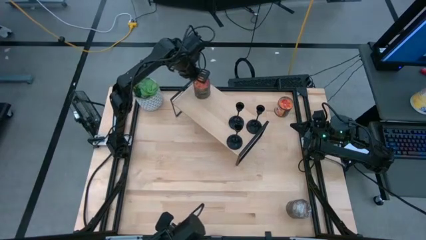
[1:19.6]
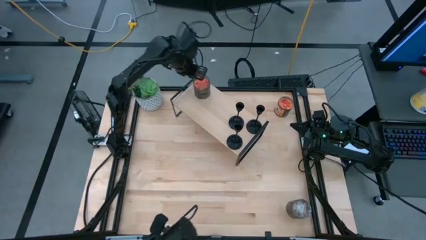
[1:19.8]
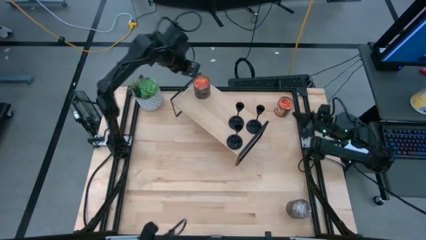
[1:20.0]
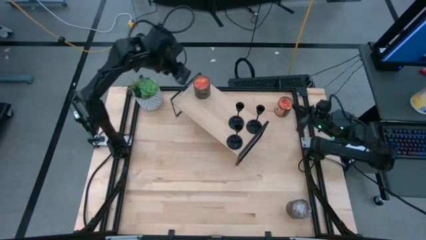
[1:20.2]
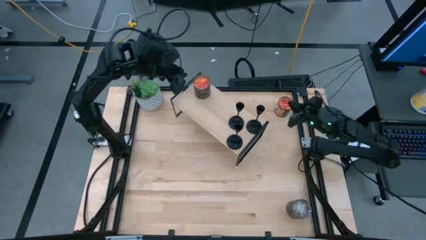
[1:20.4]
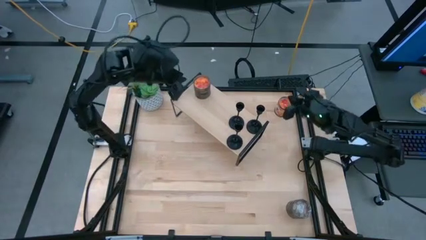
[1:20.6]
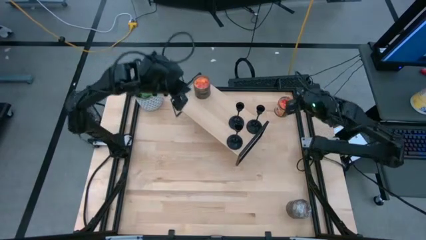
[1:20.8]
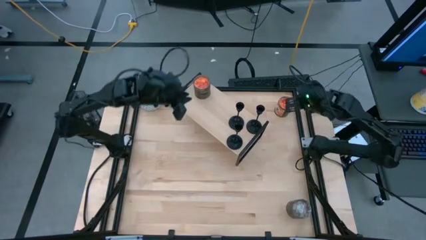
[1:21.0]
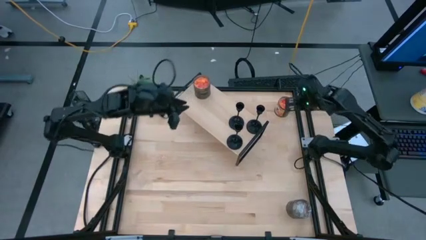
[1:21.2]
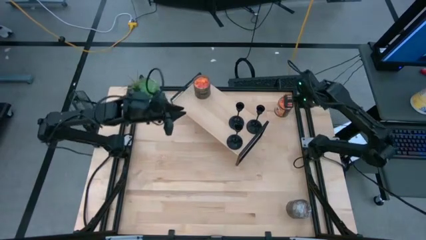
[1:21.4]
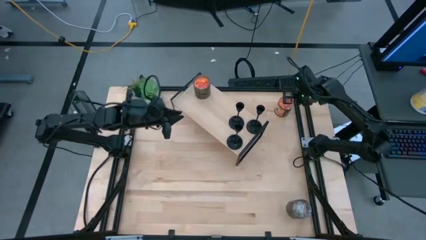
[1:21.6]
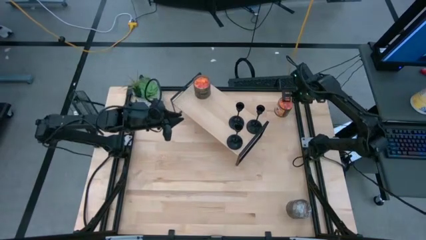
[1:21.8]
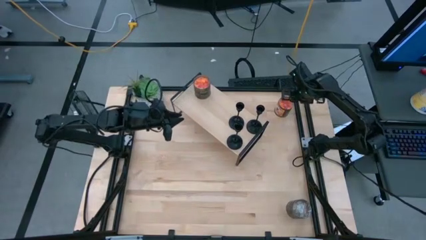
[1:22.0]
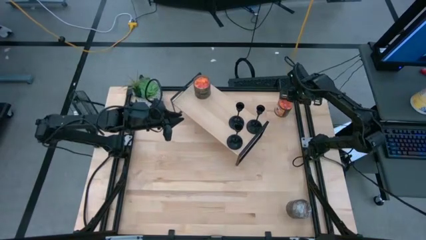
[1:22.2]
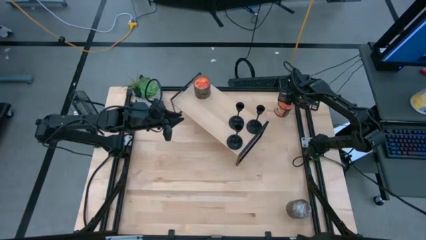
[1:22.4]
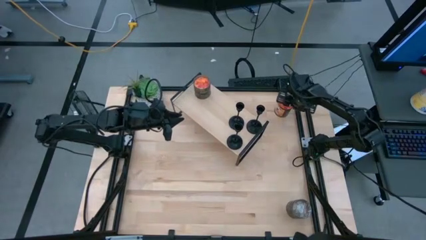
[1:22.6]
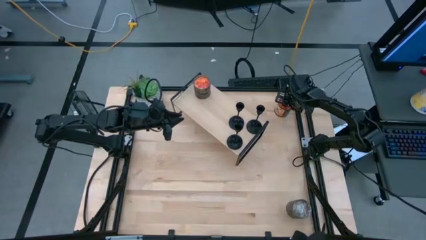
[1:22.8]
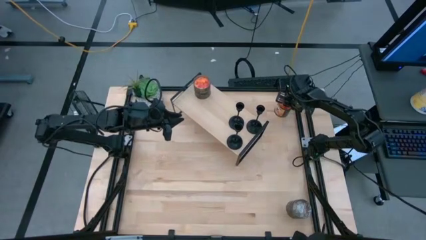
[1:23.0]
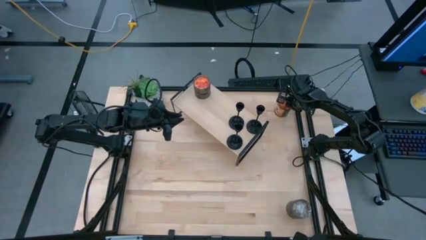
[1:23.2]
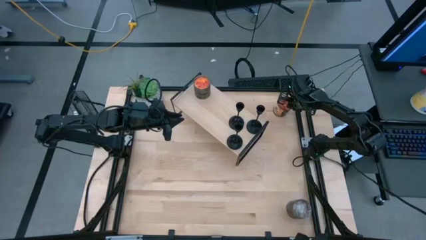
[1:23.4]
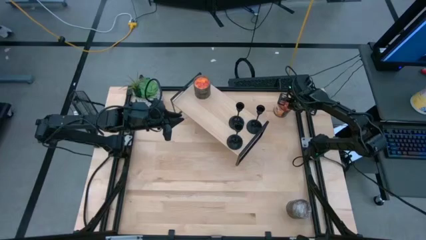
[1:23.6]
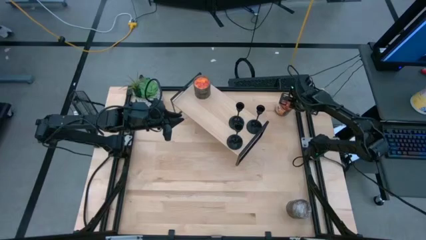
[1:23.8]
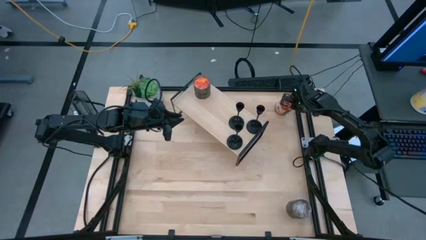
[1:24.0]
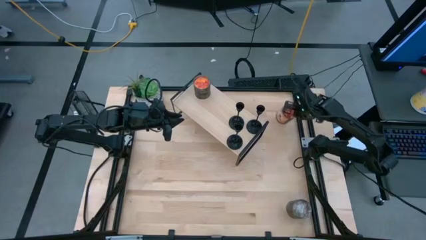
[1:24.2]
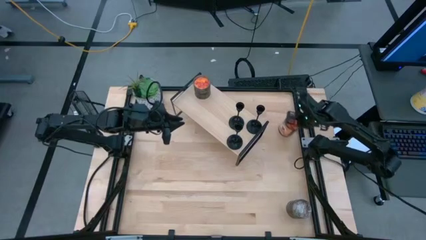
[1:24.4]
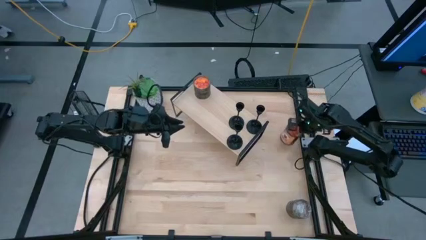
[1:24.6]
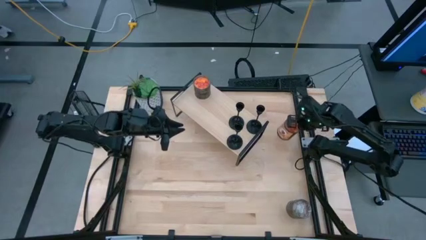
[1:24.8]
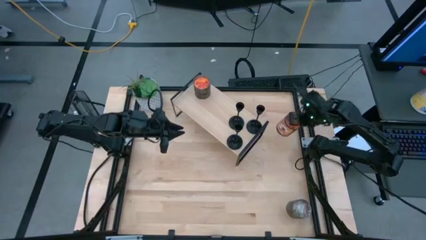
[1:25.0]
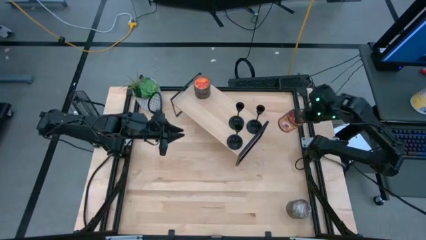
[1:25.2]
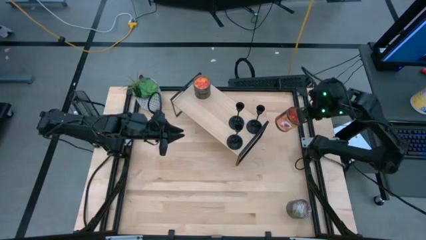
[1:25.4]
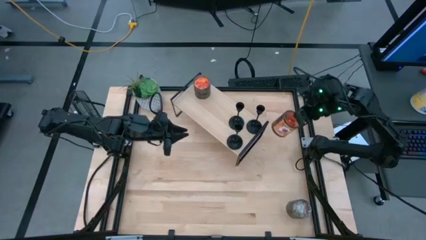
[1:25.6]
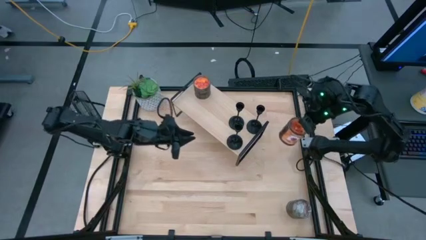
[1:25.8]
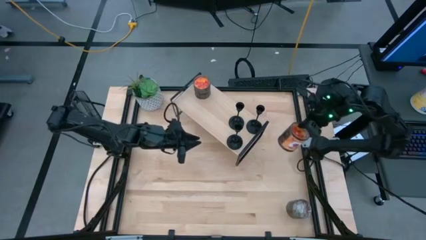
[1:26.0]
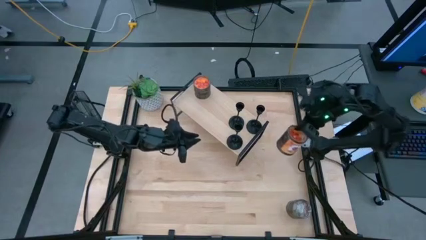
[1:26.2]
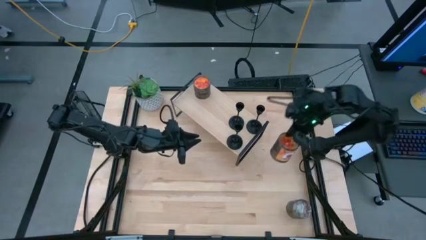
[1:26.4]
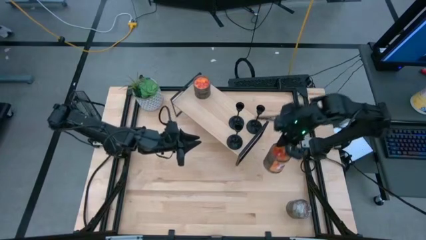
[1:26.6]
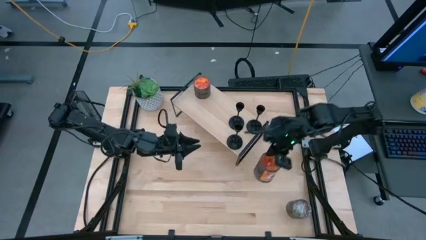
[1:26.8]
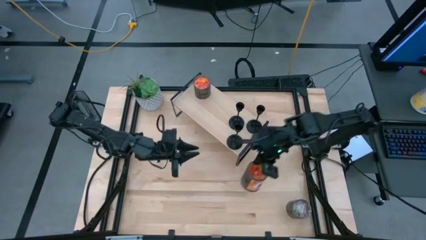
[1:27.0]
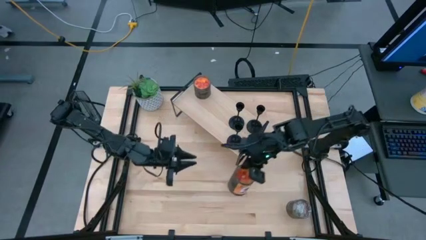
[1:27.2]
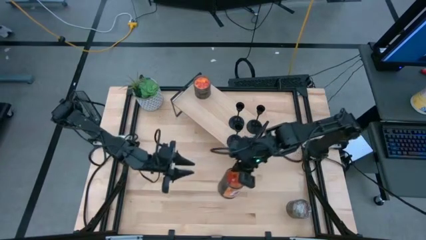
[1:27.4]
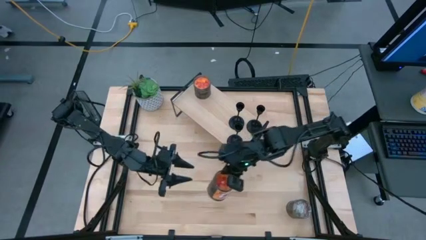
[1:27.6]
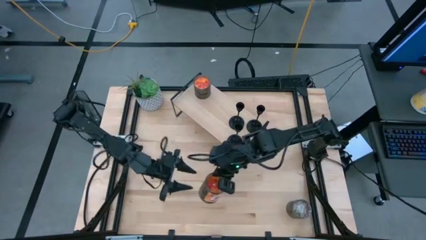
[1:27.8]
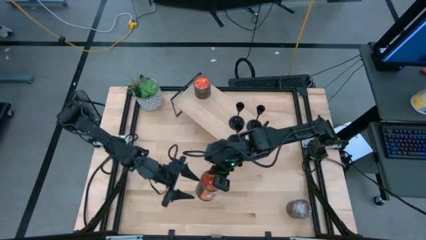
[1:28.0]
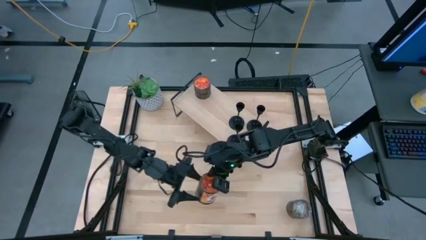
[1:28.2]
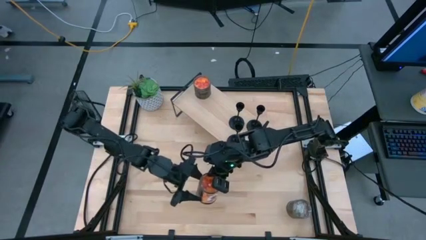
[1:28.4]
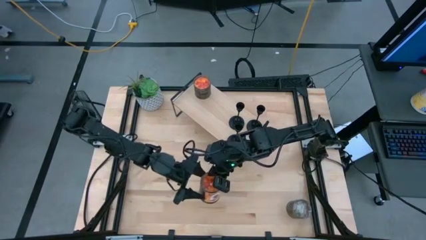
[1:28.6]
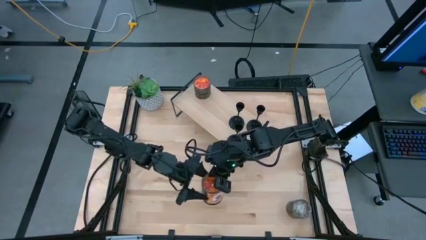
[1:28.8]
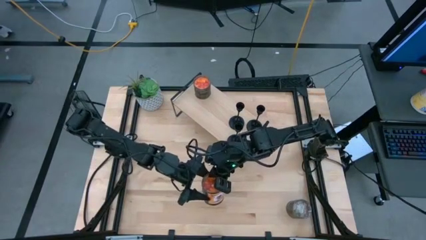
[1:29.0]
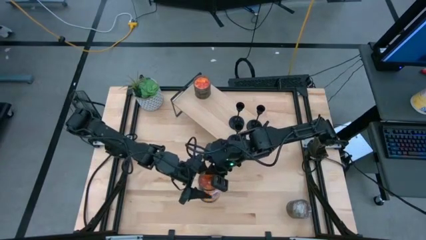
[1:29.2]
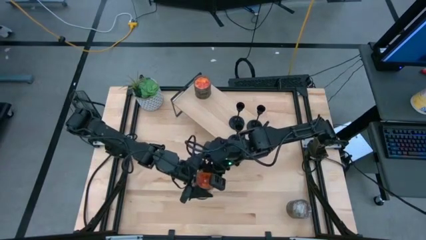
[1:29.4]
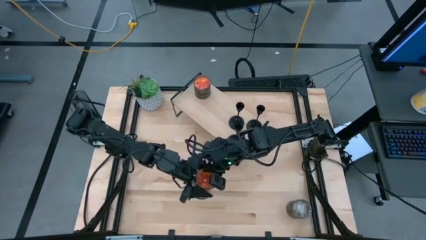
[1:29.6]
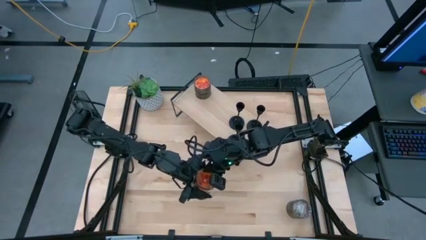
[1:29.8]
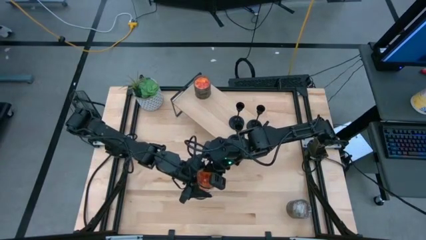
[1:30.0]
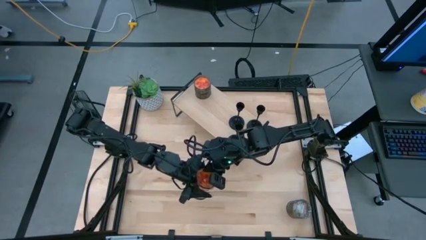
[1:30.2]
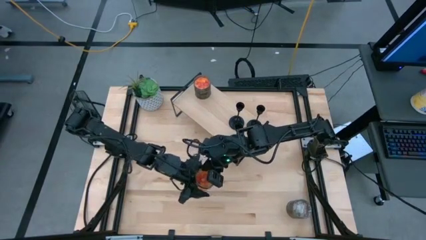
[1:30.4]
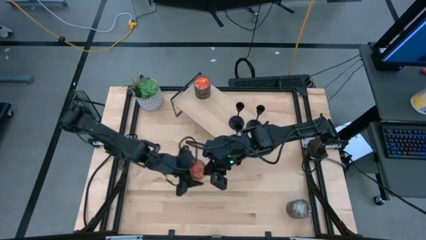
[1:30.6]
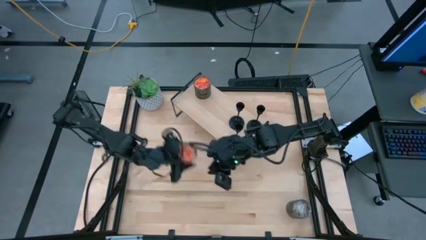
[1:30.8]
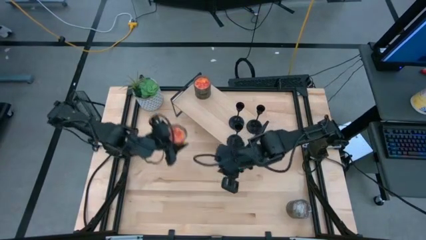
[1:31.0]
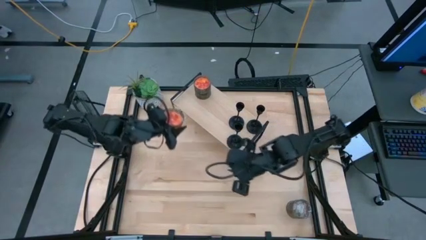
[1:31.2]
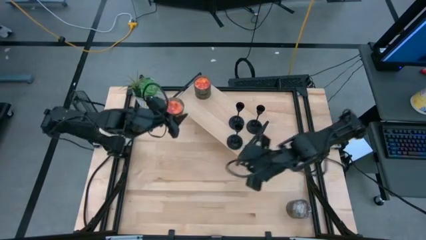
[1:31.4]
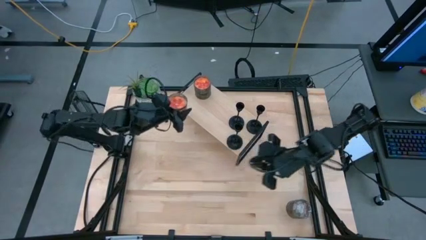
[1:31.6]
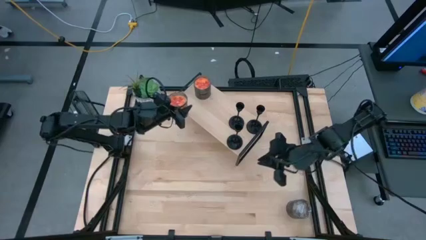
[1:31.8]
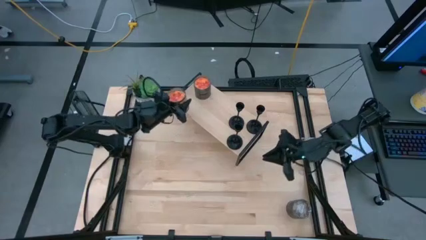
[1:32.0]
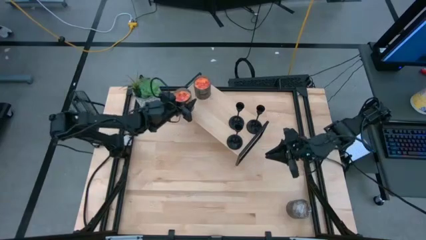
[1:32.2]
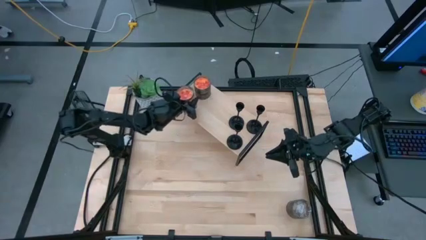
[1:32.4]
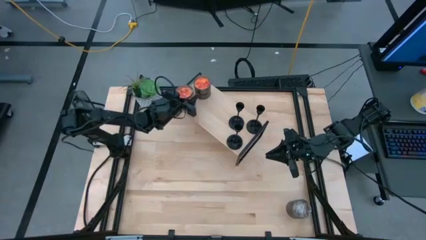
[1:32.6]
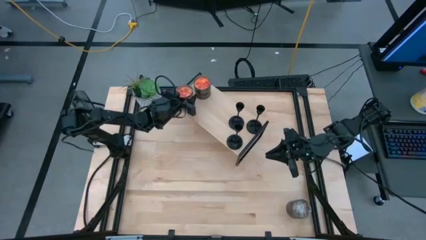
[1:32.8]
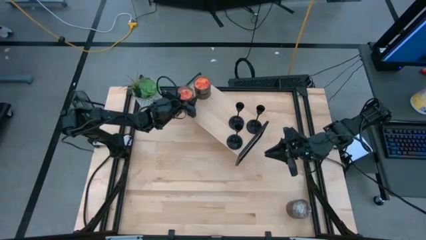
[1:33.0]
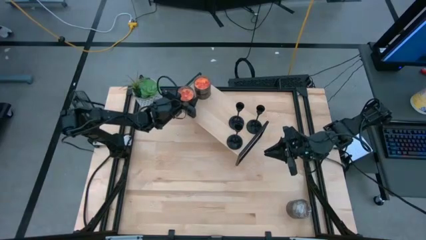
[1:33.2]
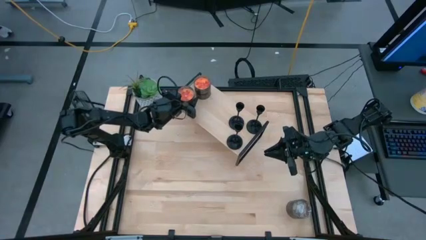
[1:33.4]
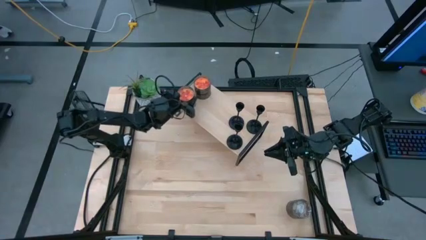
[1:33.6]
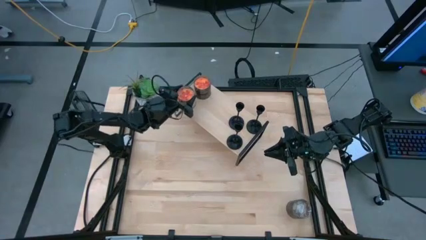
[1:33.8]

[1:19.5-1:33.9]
Task: Pick & Place candle stick holders
Put the orange scented candle on the shelf
